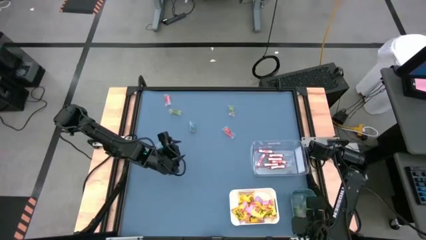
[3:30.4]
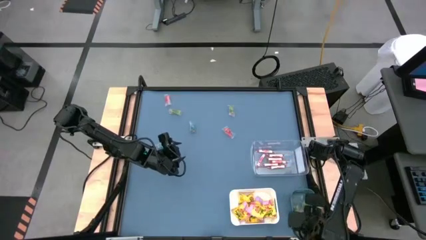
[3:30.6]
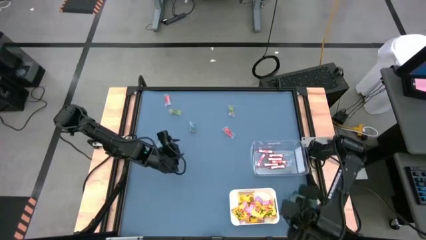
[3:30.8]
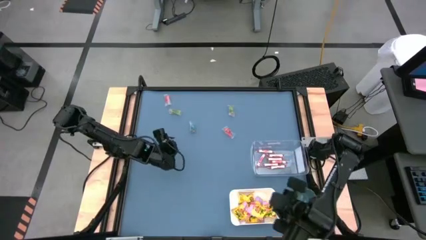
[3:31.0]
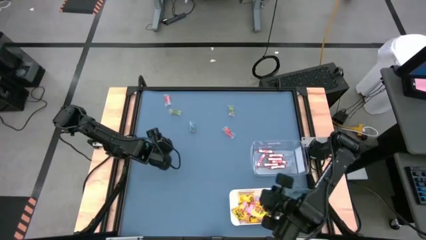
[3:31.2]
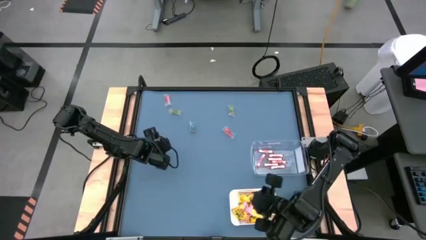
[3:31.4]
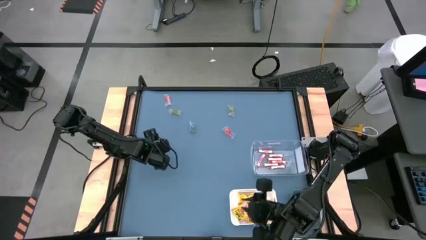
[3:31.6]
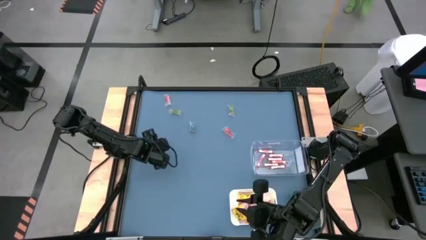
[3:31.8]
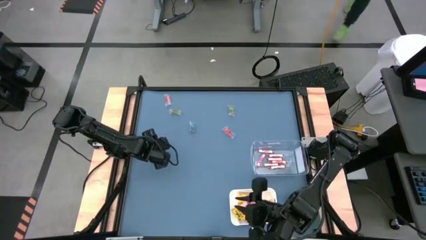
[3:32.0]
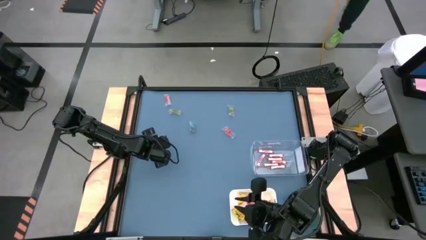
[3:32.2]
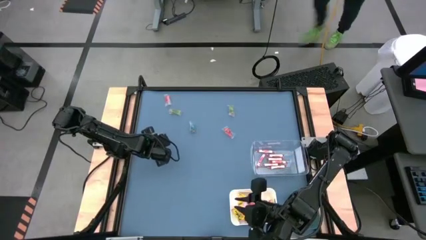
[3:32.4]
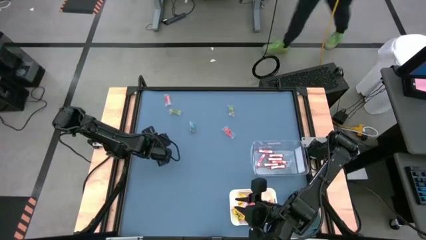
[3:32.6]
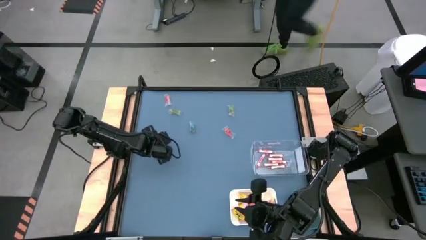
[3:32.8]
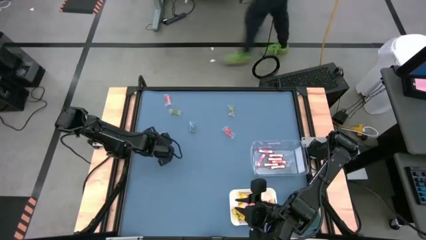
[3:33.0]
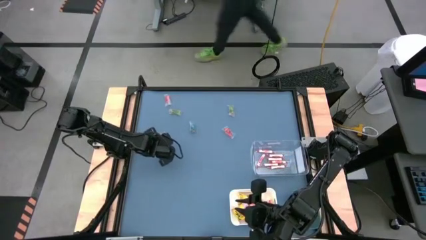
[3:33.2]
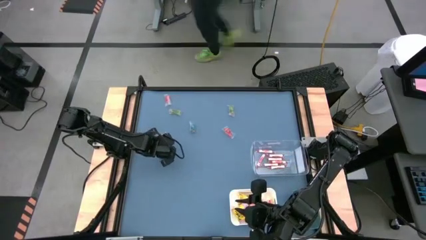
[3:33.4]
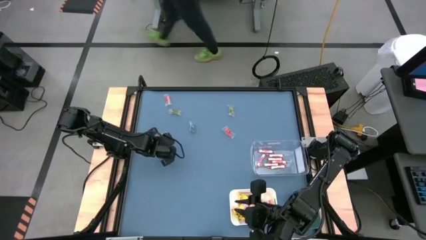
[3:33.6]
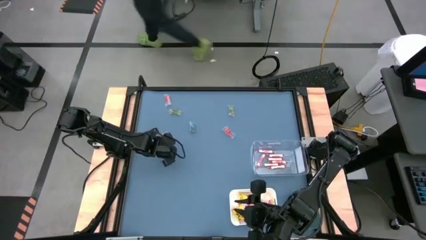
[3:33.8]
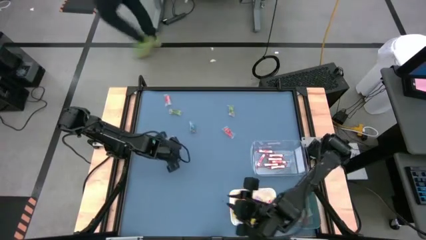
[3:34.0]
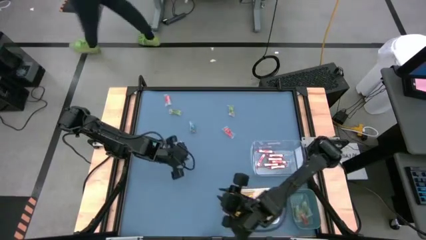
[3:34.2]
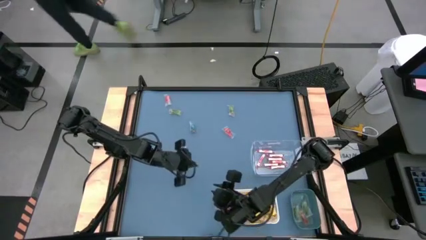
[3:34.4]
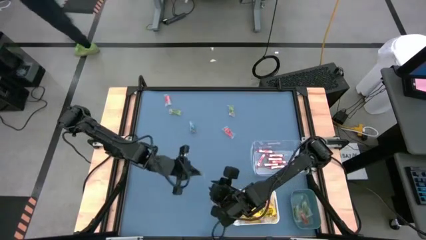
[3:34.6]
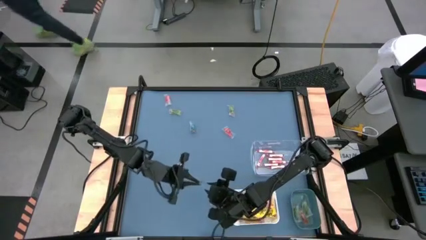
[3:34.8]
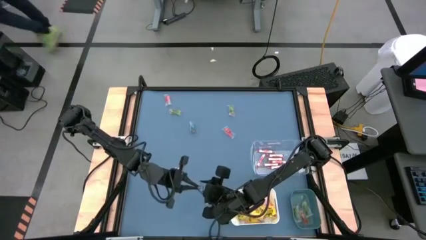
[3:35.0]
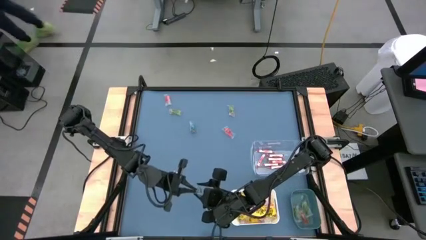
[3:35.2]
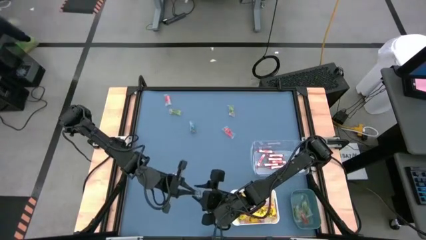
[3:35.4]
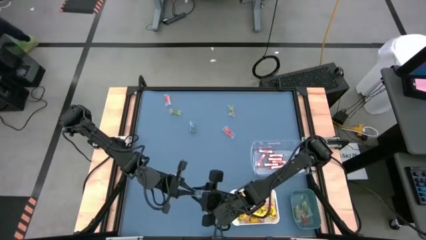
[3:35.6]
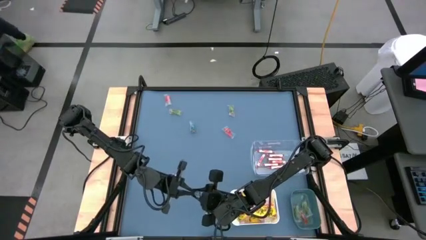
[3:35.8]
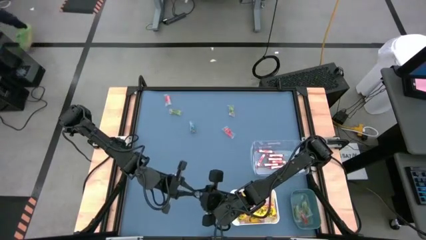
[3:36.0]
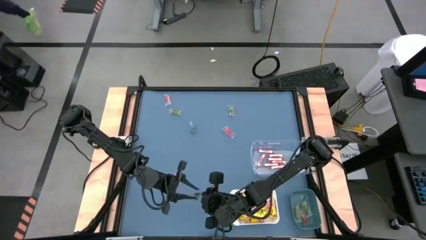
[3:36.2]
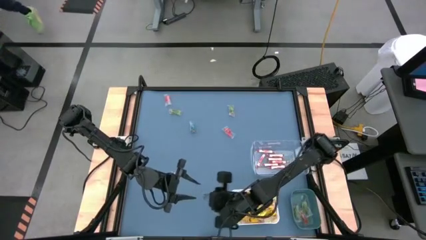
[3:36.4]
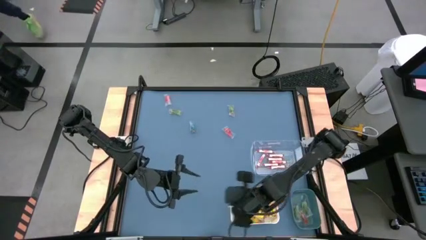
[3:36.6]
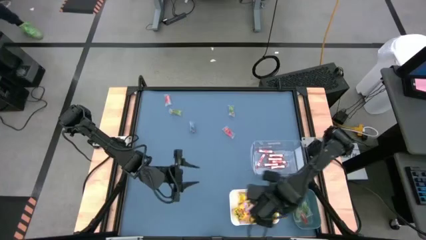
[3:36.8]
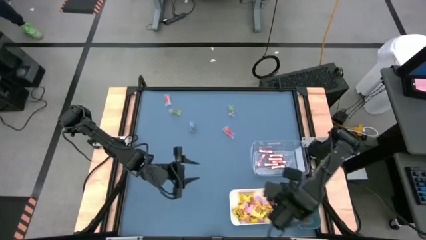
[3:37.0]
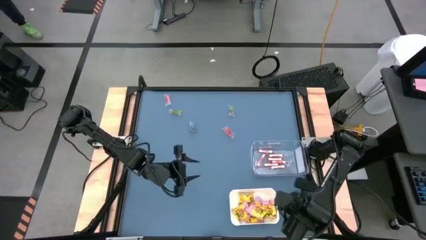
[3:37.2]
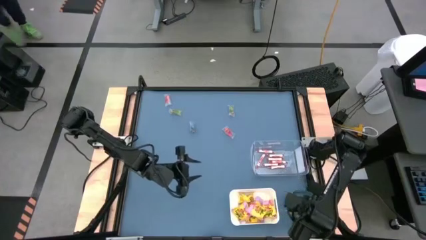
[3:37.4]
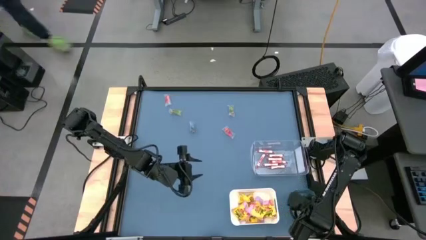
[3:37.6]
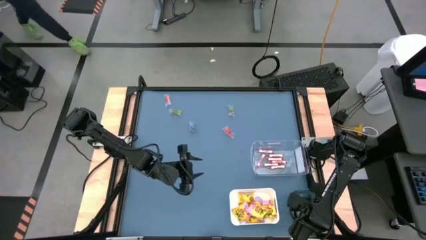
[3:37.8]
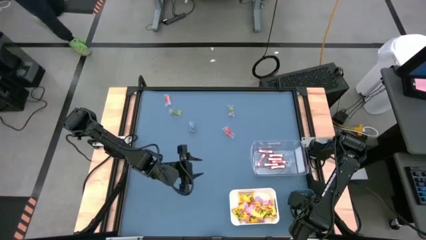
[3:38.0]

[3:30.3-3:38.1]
Task: Sort candy
Put the blue gummy into the blue bin

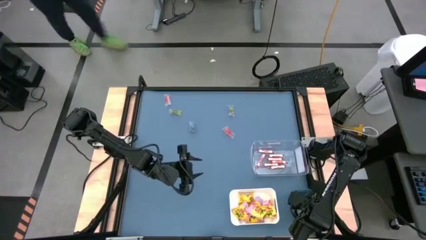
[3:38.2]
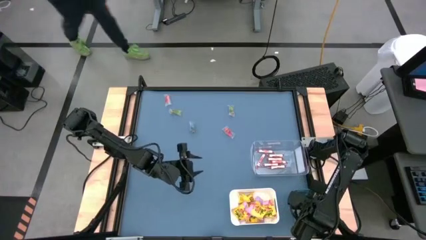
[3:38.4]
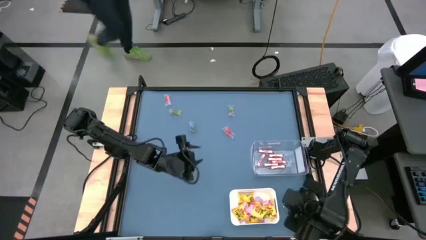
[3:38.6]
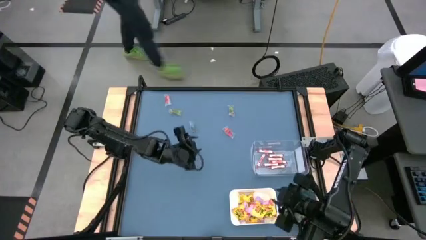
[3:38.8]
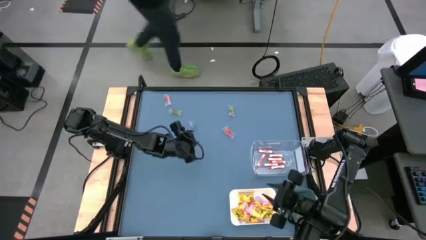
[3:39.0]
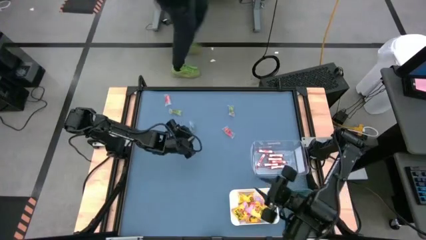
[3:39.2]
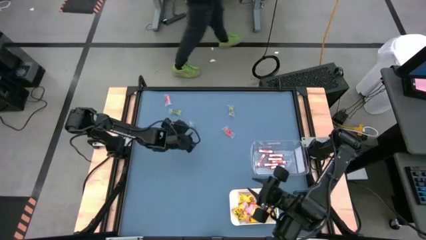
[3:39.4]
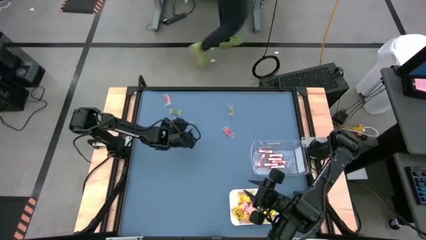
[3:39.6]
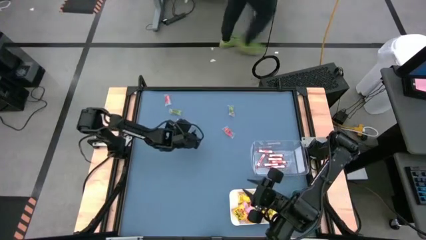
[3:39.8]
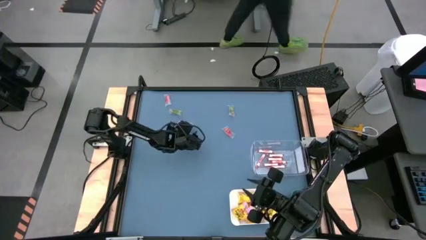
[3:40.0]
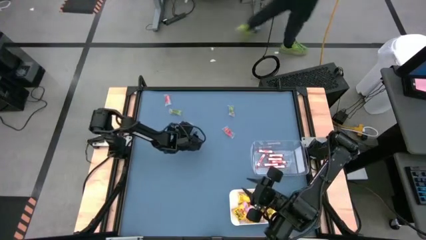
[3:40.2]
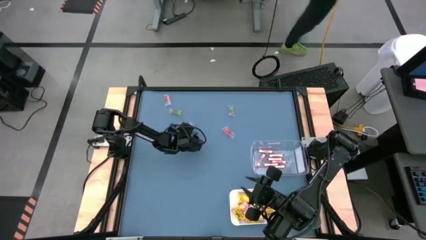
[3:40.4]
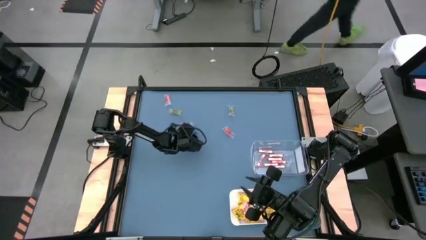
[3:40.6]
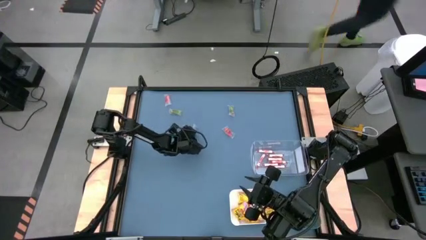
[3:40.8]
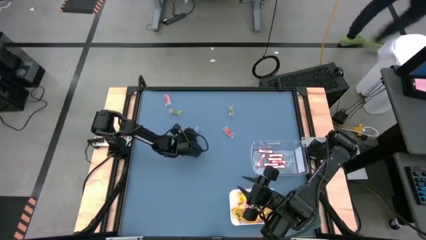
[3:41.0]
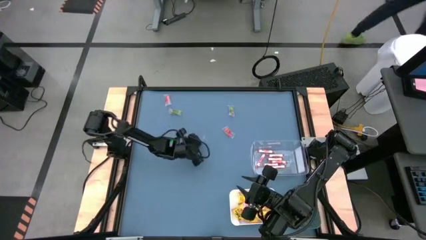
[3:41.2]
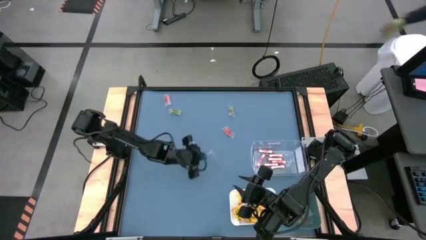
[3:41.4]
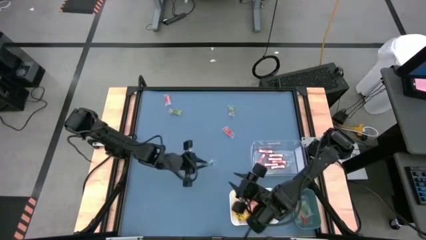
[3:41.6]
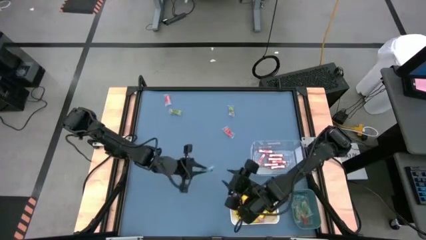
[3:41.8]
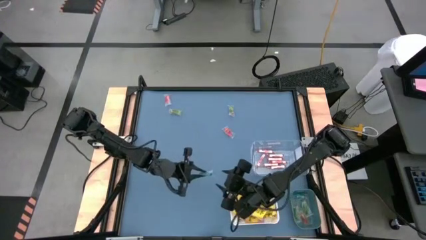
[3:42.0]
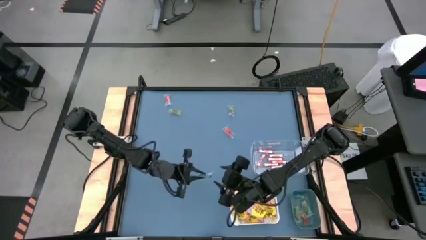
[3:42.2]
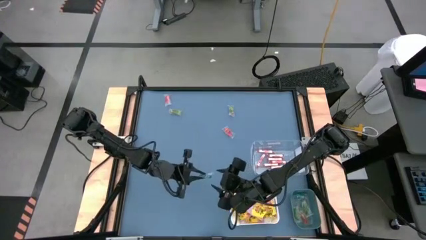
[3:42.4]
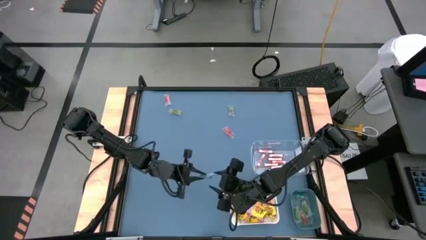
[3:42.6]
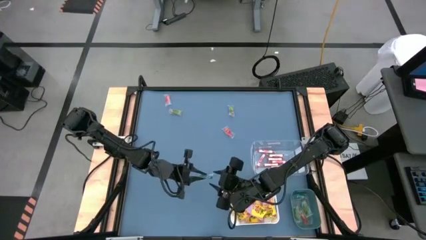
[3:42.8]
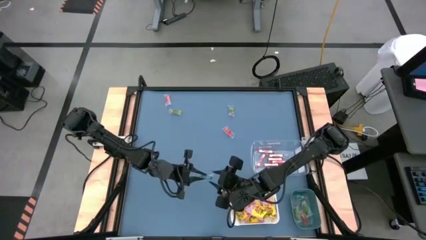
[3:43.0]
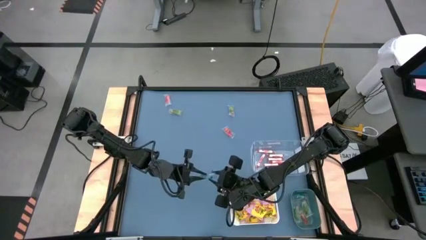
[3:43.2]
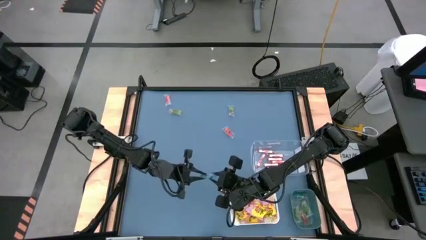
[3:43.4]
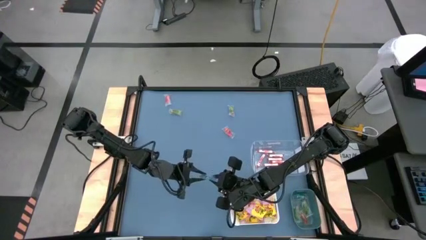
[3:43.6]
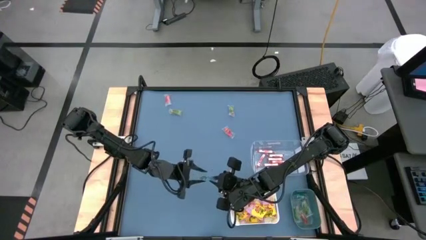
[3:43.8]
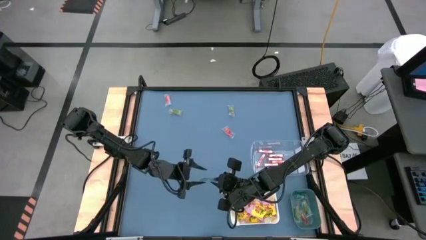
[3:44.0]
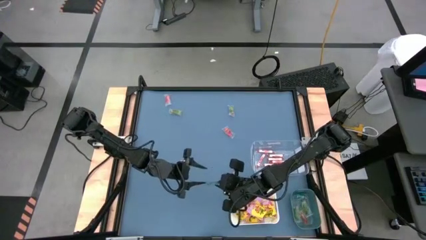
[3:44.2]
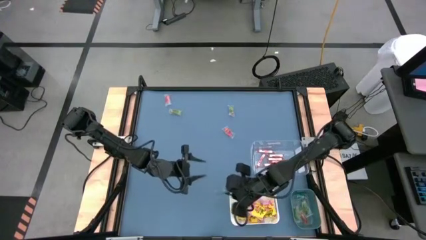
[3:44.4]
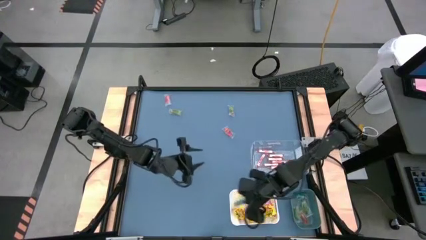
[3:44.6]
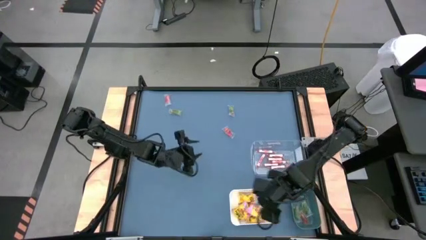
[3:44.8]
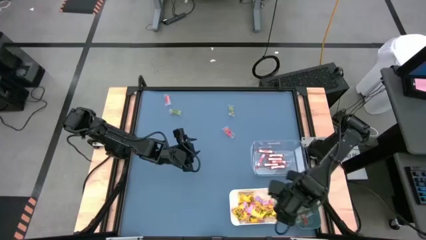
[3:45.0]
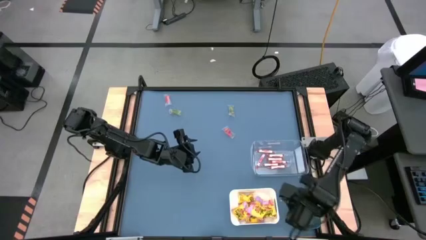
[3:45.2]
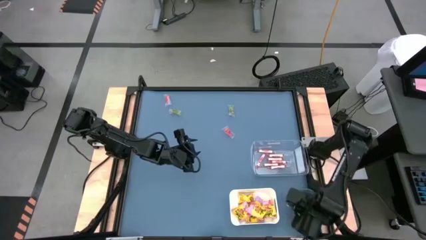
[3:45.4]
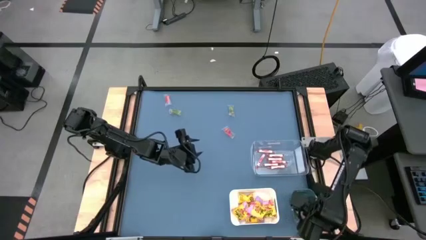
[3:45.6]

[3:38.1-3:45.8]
Put the blue gummy into the blue bin

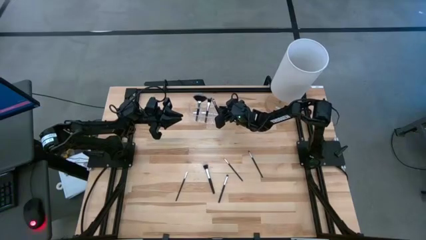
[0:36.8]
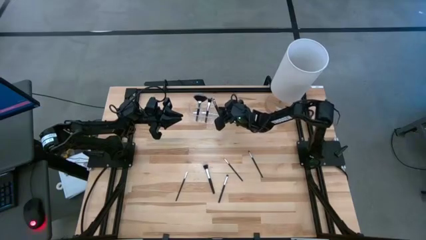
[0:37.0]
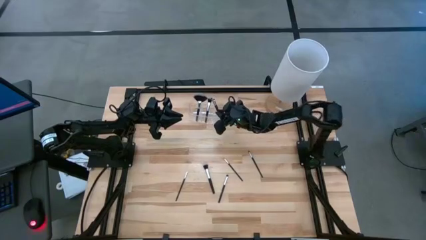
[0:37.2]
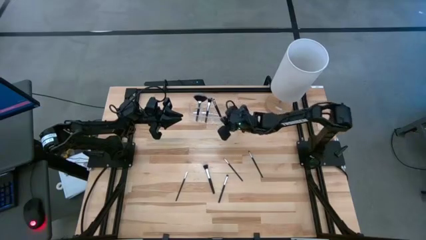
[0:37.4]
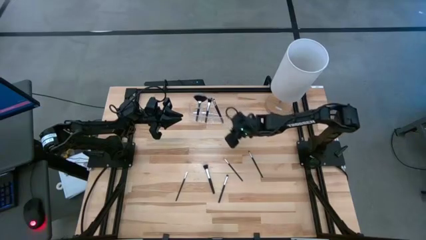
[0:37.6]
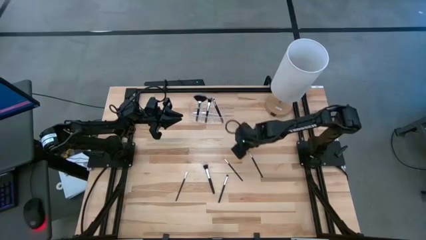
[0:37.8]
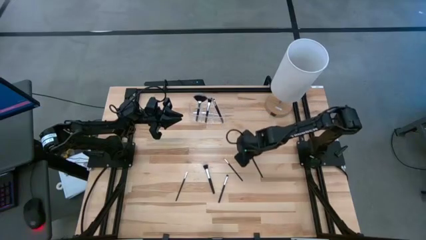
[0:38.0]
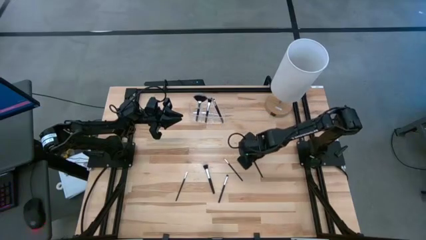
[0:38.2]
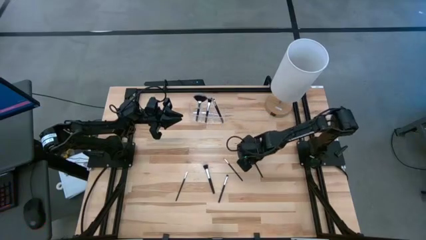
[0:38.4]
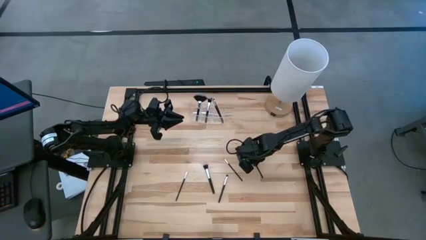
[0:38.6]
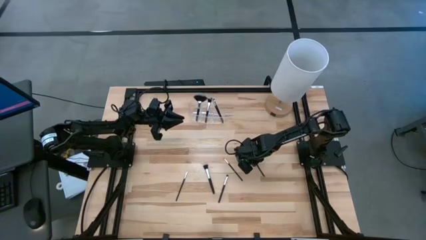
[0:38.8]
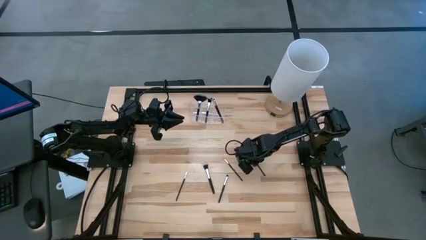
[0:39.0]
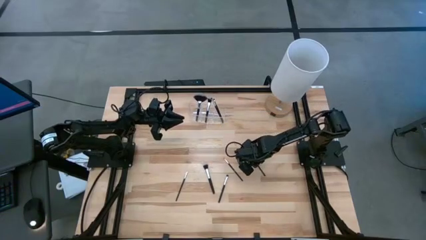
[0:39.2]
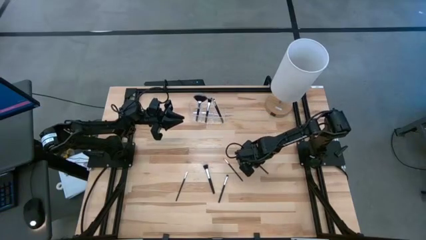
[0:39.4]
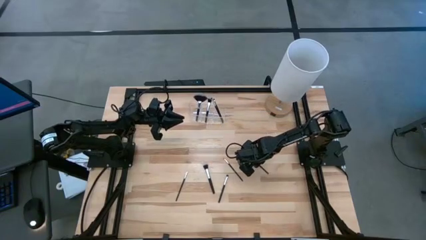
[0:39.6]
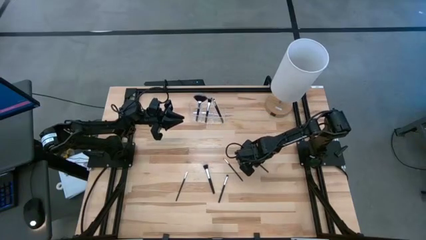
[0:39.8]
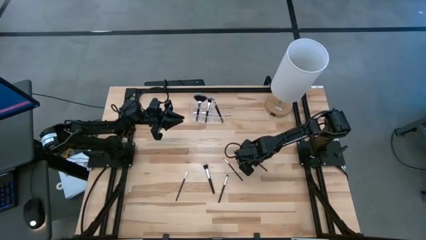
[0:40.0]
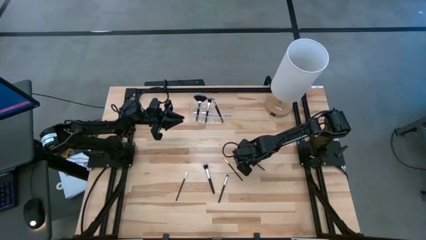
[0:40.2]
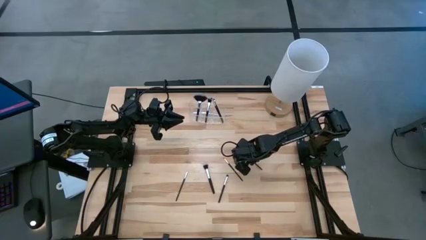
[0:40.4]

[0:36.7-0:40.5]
Task: Pick & Place Makeup Supplies
Put the makeup brush into the transparent organizer
